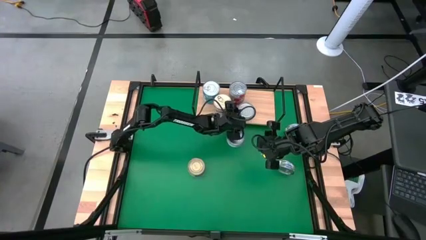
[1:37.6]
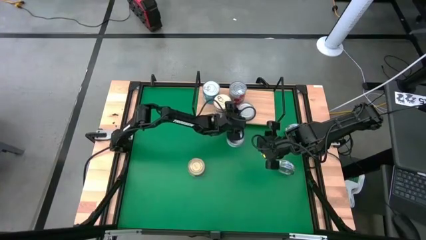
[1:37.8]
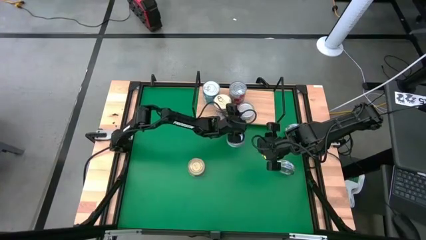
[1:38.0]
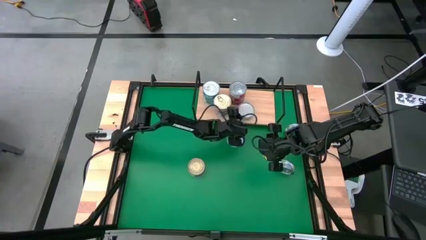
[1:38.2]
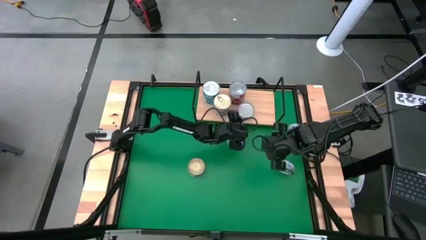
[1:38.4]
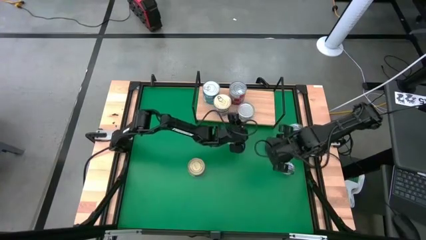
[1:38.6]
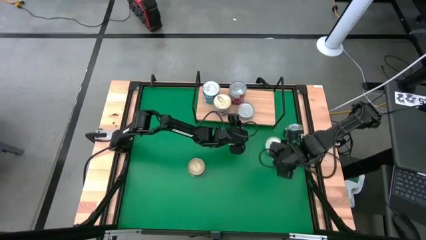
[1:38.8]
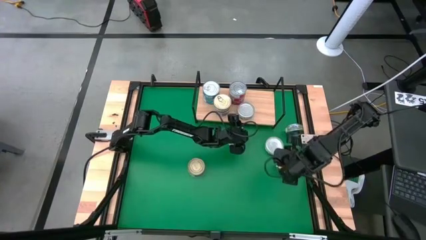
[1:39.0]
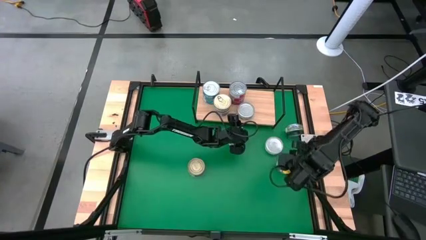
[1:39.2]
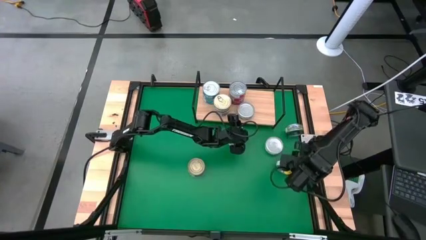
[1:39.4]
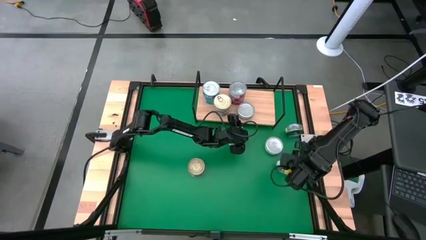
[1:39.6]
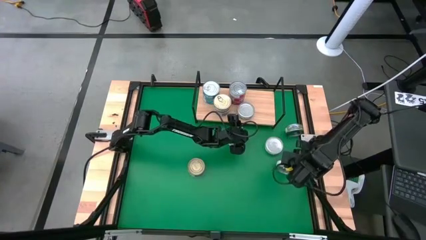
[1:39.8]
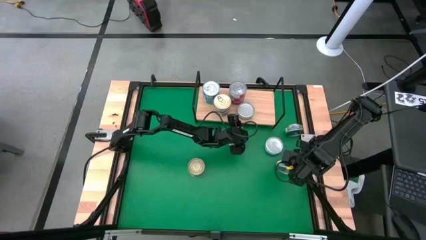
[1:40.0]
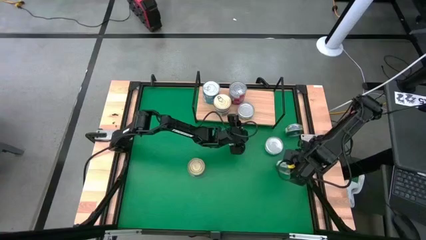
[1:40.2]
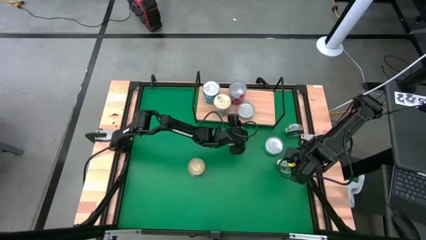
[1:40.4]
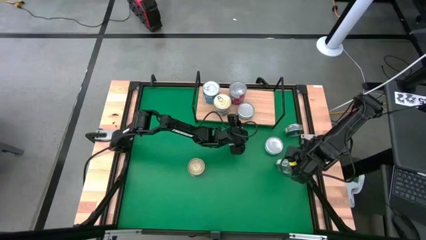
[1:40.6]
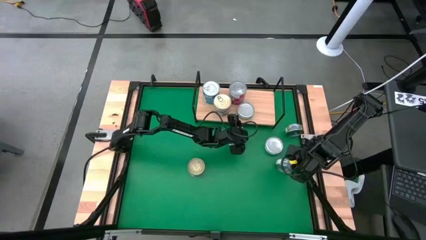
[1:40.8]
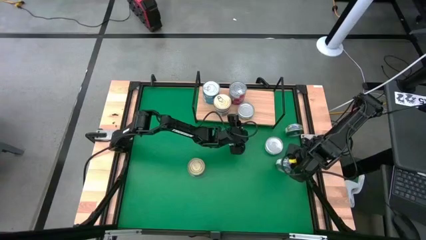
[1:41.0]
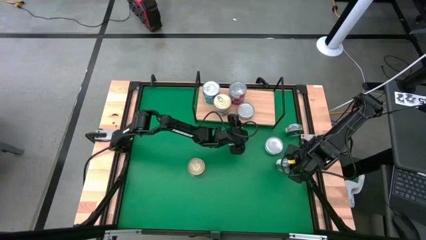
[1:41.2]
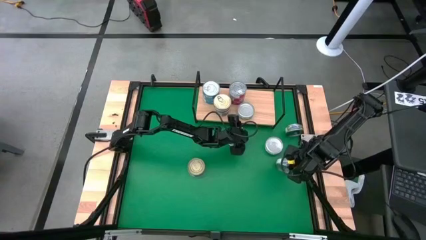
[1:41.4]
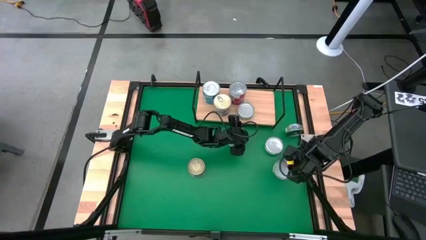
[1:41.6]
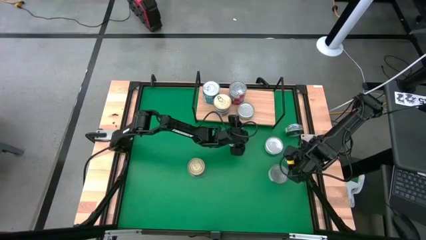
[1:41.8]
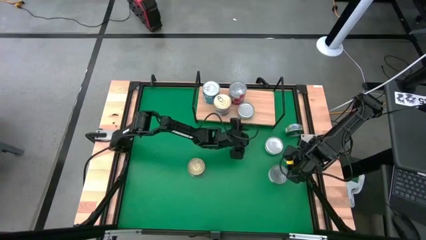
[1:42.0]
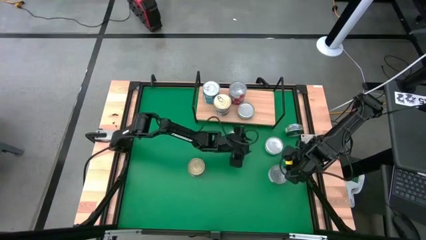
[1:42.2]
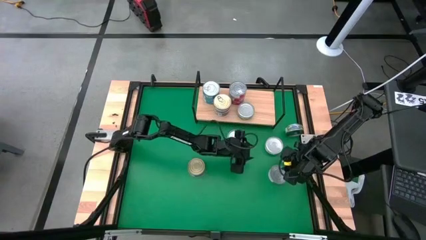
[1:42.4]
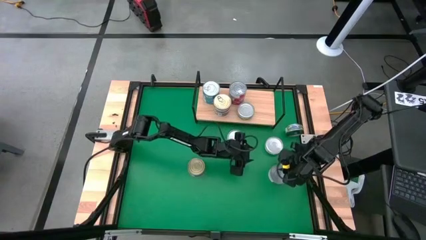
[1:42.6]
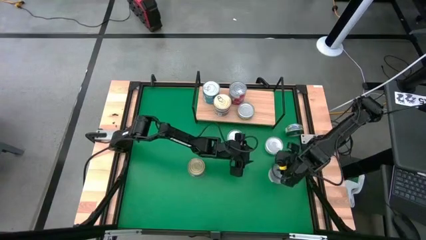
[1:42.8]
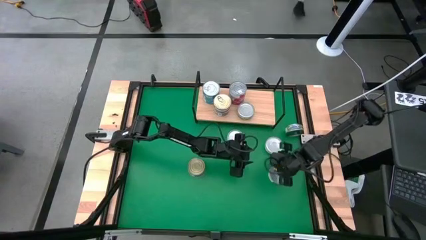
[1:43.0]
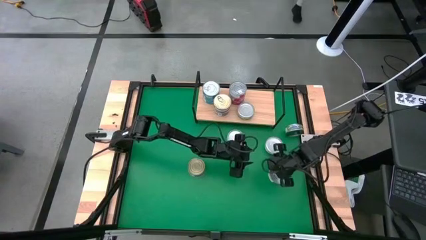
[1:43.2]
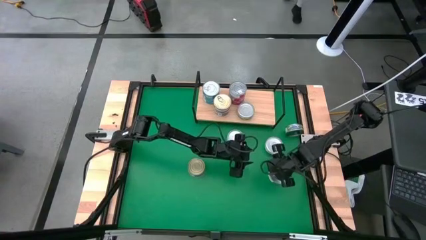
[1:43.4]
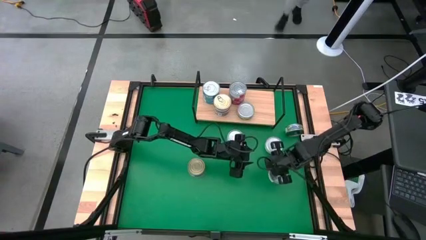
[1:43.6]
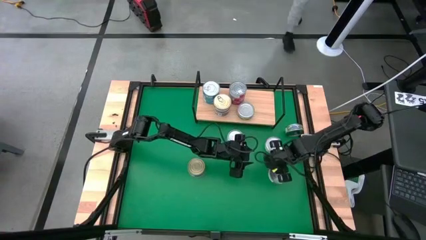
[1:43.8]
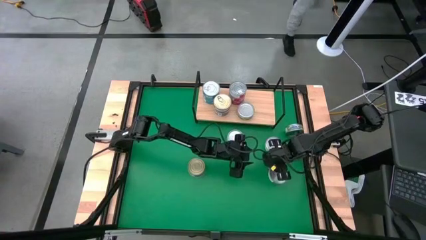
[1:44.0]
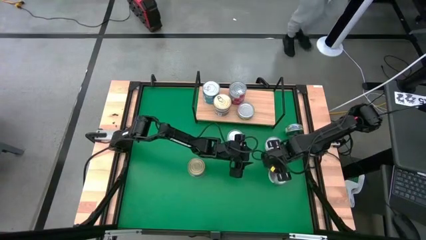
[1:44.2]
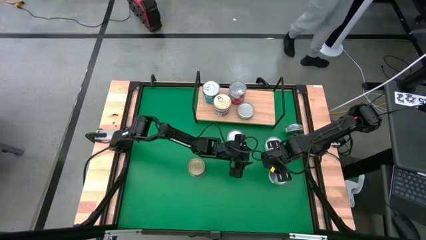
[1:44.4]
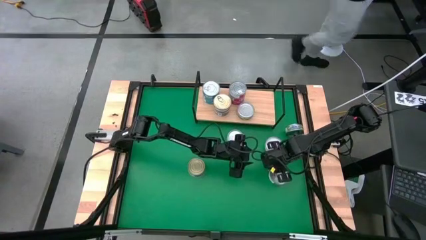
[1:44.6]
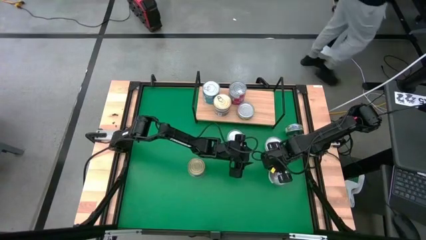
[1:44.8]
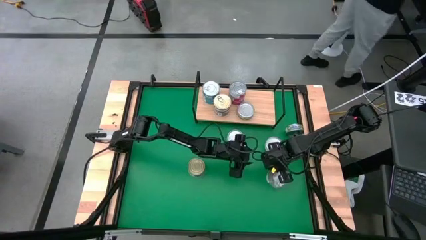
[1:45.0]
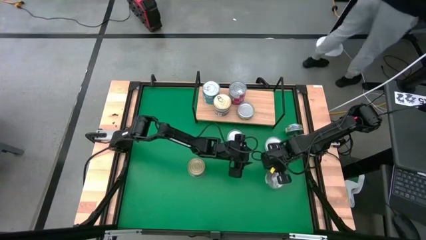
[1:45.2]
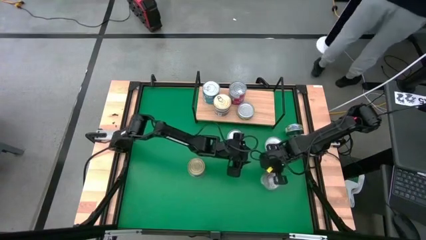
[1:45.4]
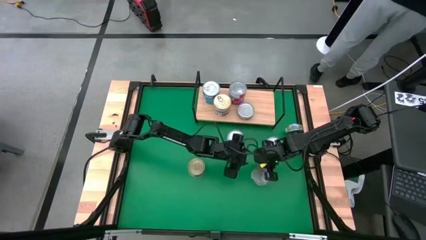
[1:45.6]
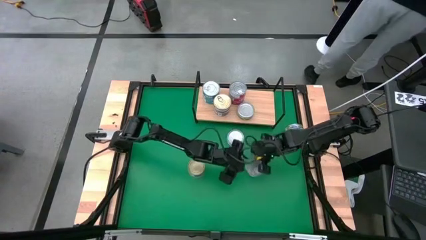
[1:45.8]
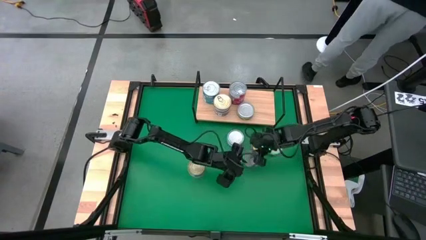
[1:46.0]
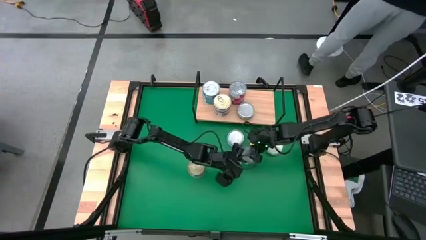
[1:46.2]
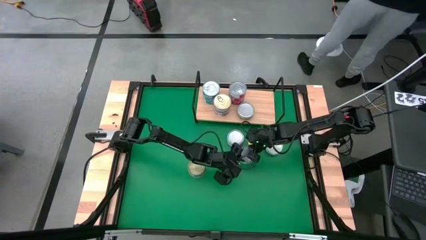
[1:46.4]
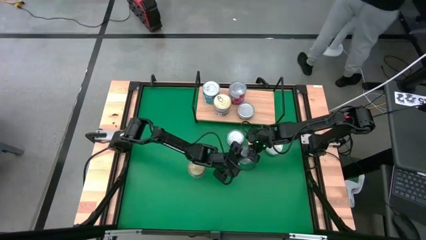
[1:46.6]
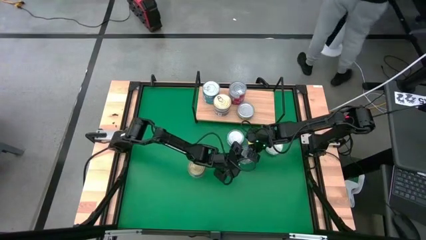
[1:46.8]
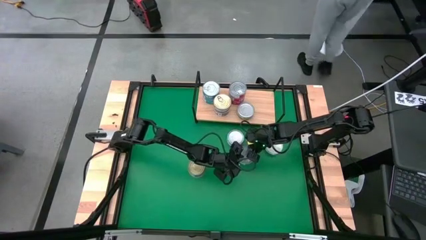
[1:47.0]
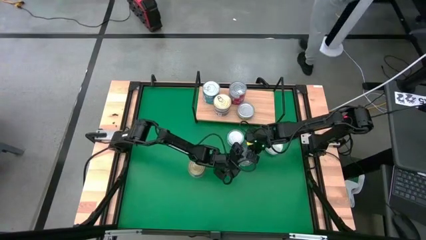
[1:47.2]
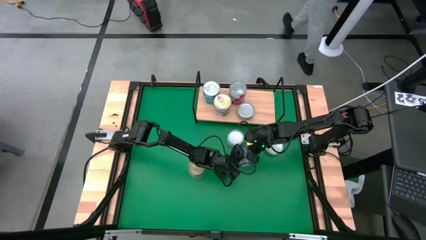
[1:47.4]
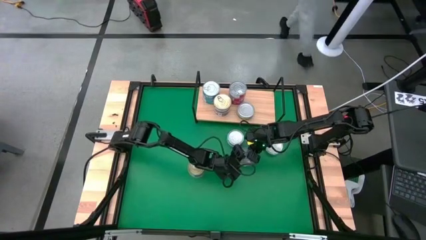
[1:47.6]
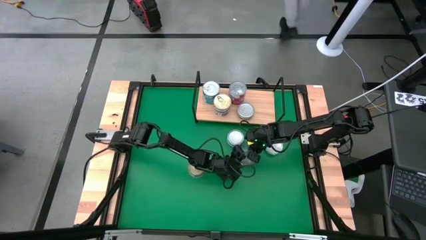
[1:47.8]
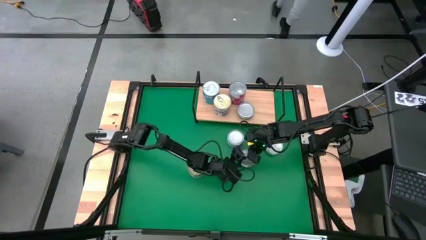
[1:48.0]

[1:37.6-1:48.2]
Task: Stack canned seafood by type on shelf
Put the green tuna can on the shelf

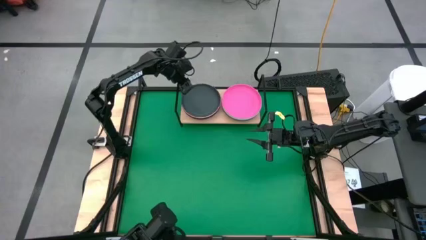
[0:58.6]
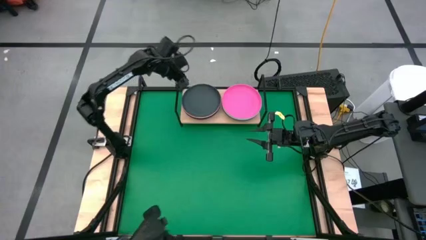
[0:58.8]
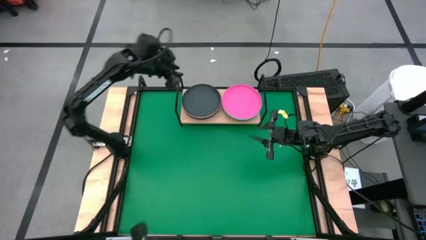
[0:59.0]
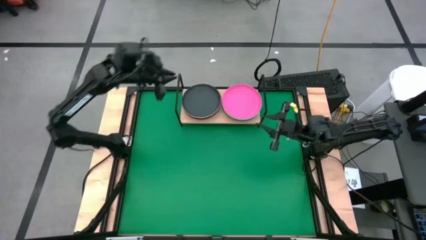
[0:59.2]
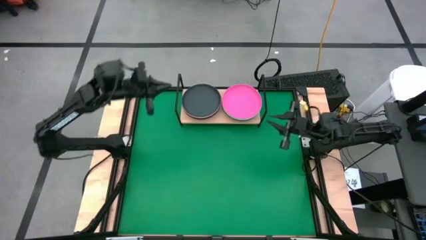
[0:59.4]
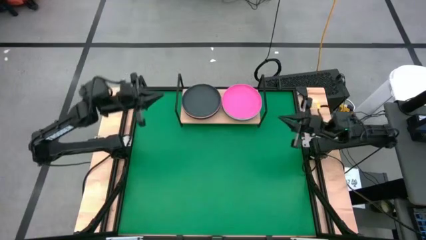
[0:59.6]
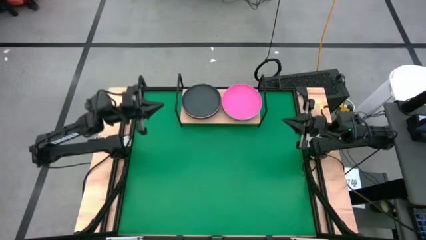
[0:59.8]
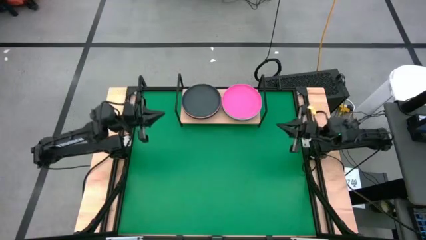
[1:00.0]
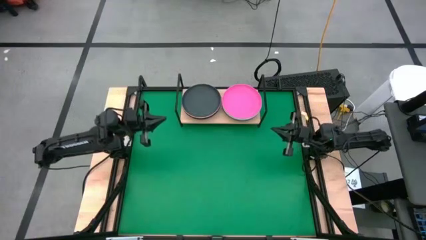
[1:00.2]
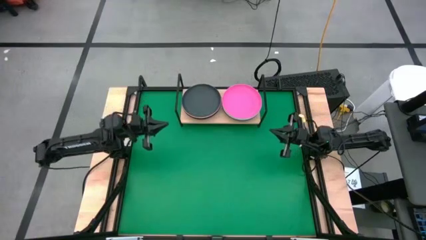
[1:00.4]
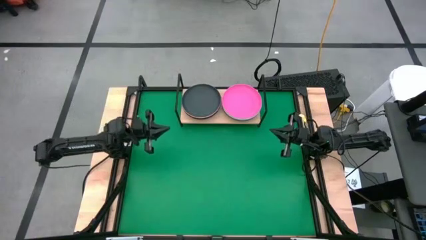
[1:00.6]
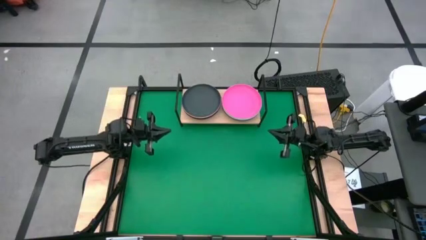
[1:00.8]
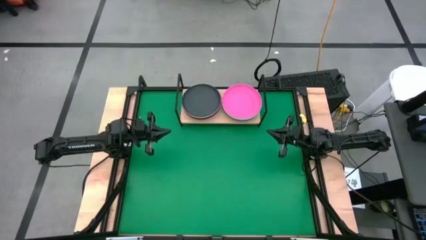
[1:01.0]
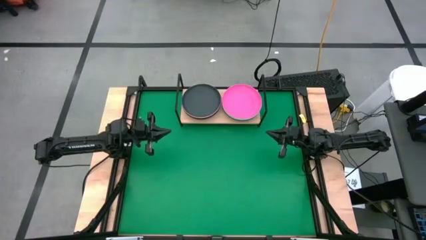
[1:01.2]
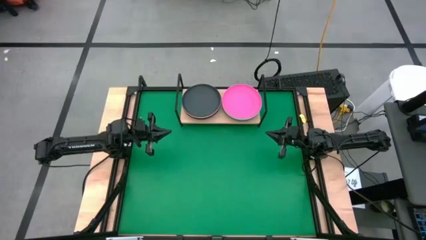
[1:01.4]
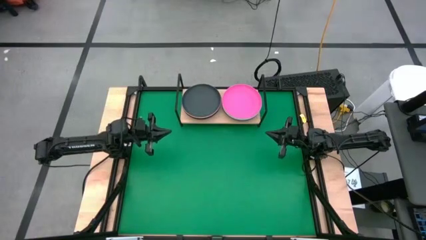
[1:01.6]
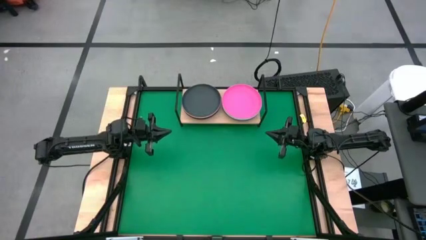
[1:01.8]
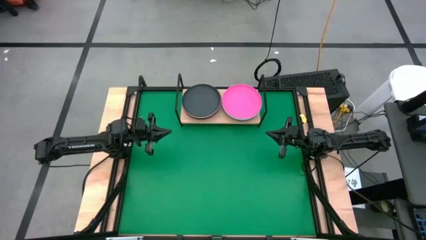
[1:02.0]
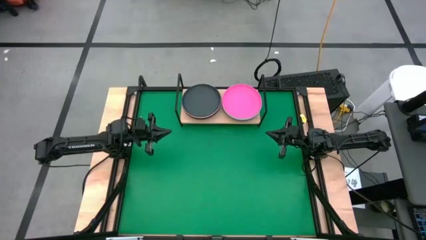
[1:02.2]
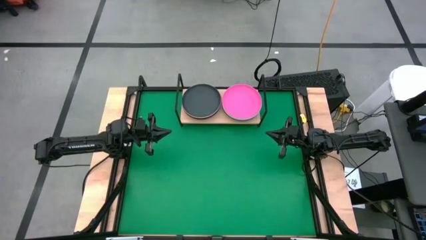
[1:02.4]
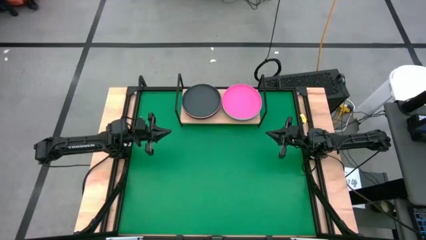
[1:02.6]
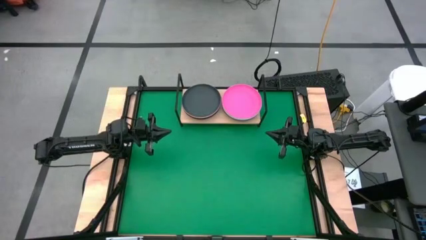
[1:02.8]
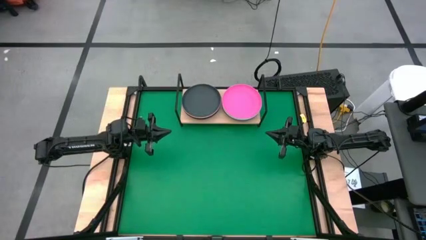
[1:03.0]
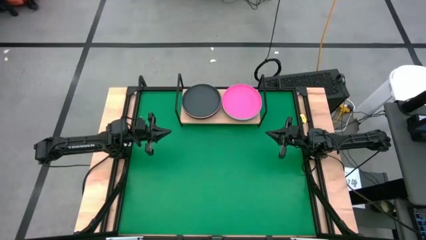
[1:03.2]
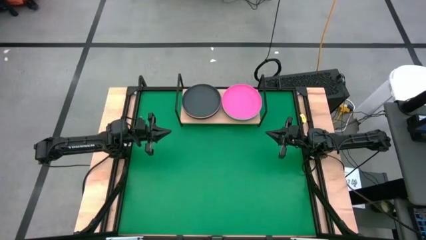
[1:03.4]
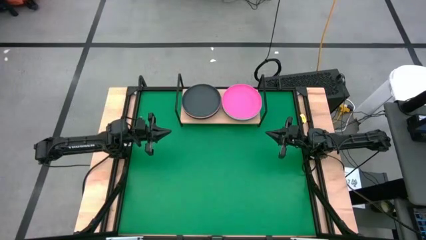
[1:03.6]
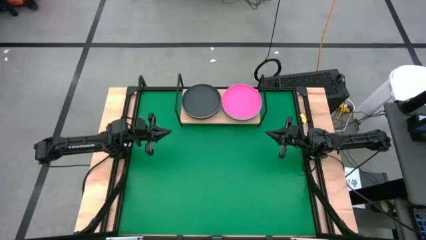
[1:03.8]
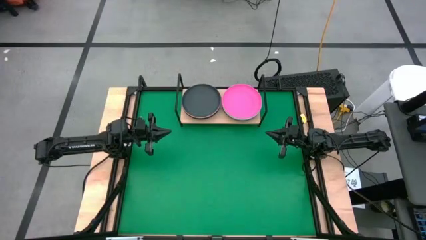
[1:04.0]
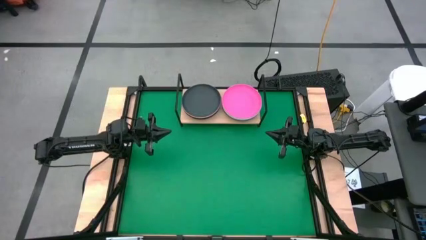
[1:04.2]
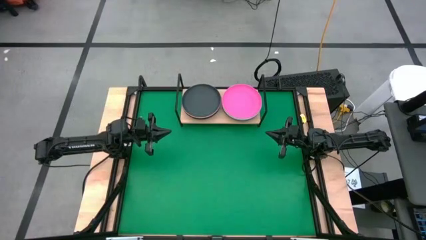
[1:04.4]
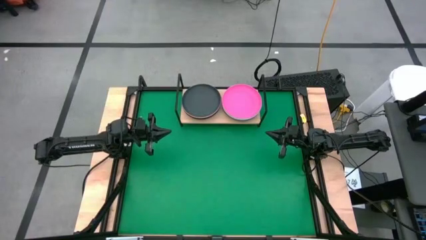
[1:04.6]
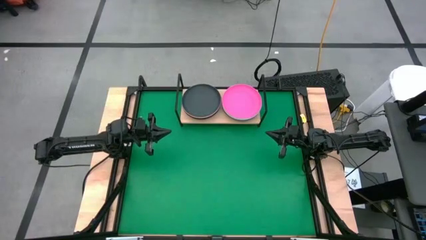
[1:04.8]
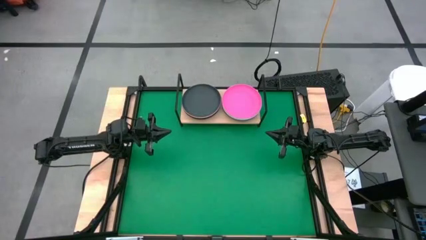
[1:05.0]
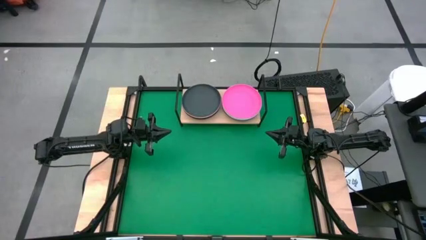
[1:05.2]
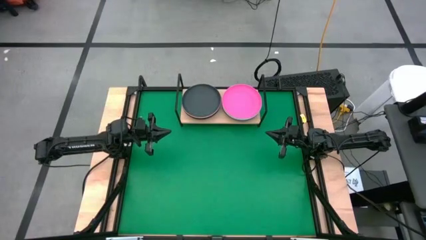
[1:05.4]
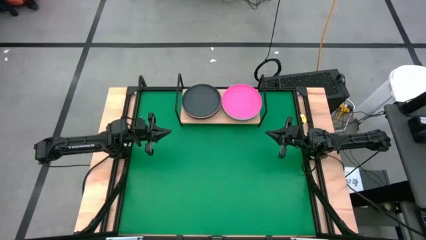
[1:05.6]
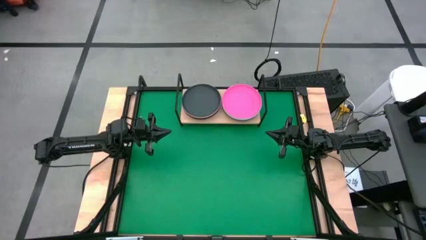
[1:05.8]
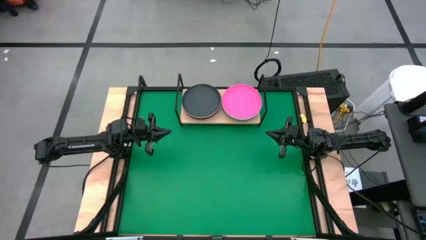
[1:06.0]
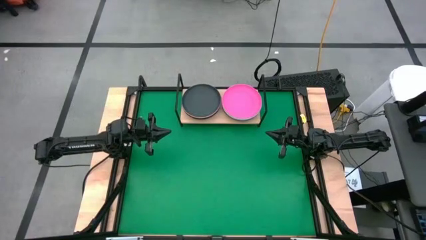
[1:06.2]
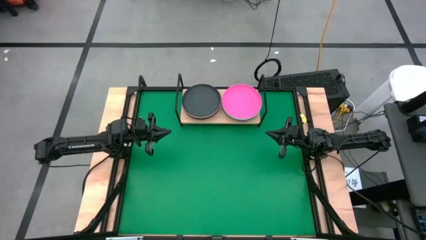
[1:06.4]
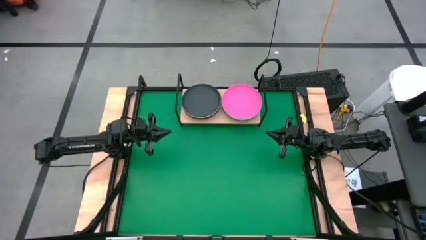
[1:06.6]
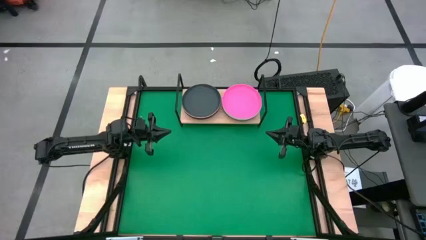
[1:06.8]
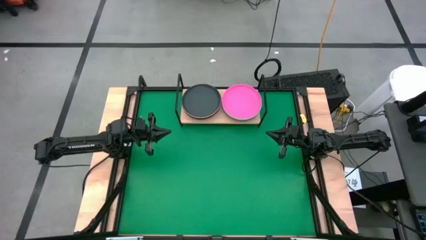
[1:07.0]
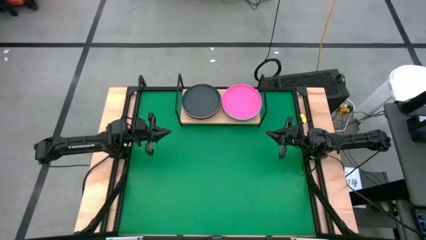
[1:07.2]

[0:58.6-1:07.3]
Task: Place and stack plates onto a shelf
Return to Home Position
